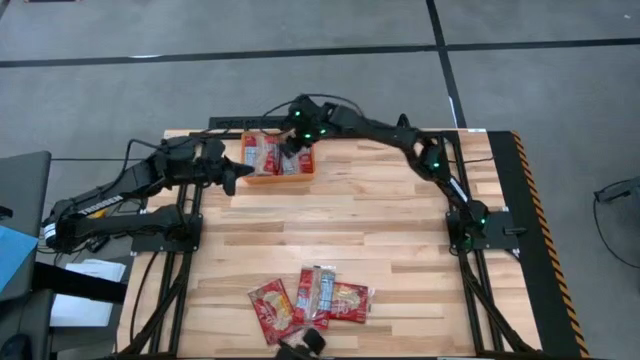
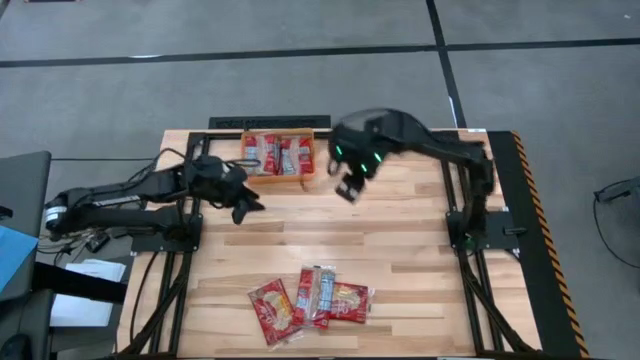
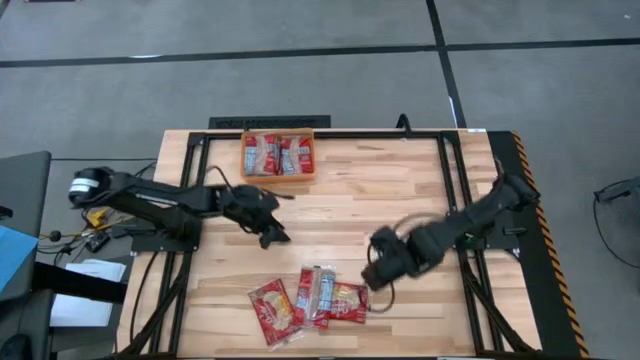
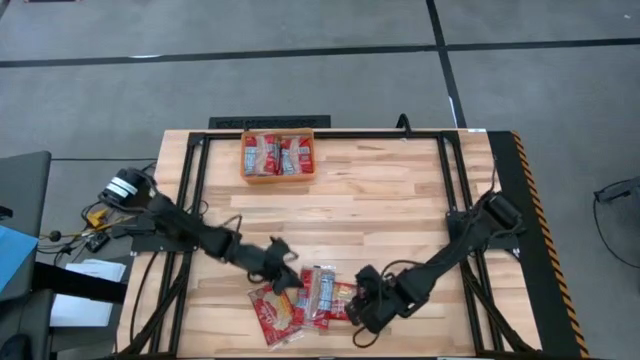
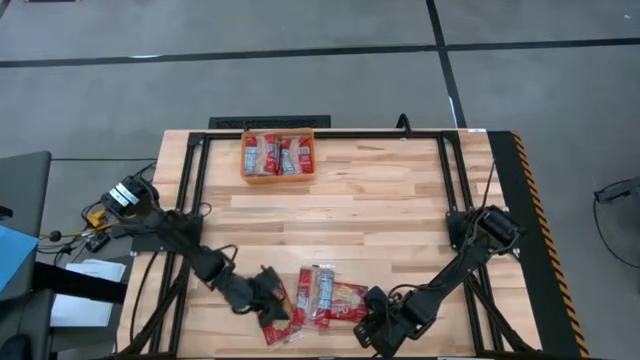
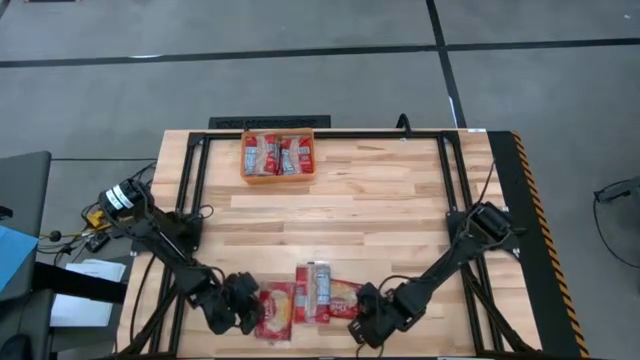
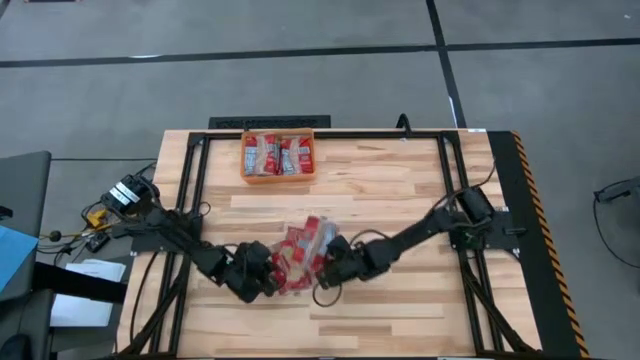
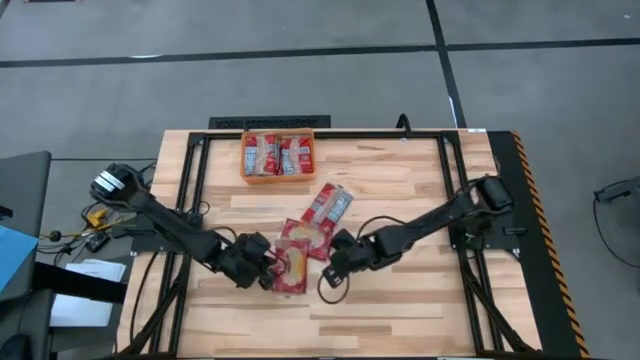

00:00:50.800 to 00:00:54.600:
Task: Sort popcorn bags into baskets
Adjust the popcorn bags

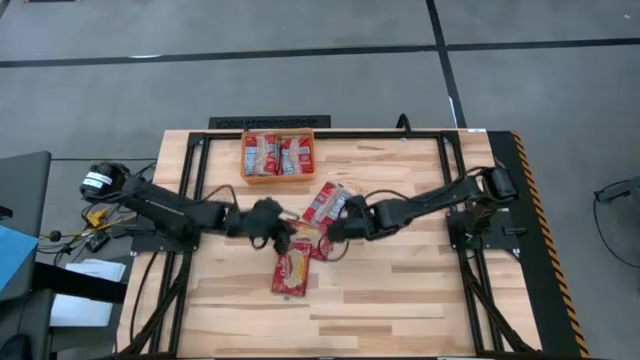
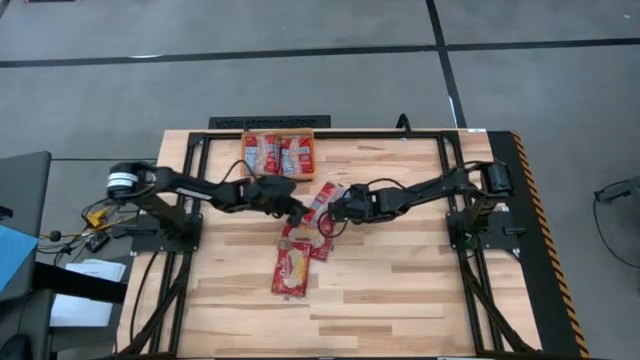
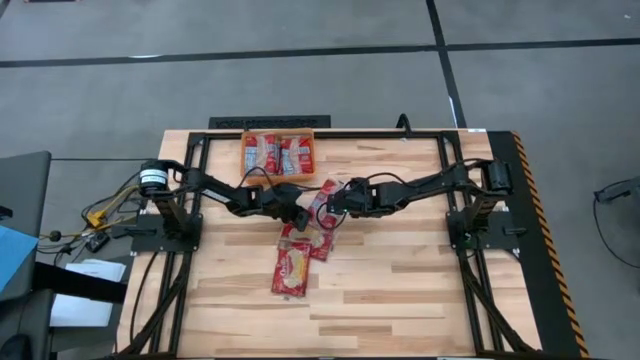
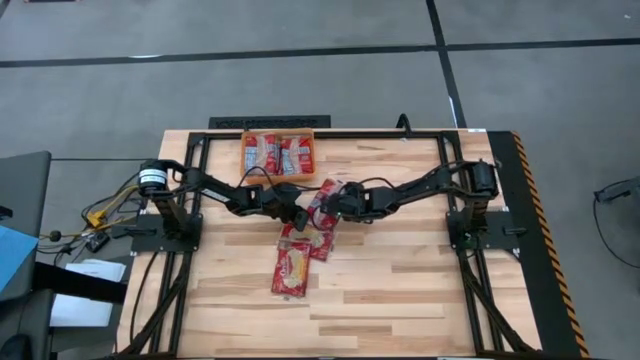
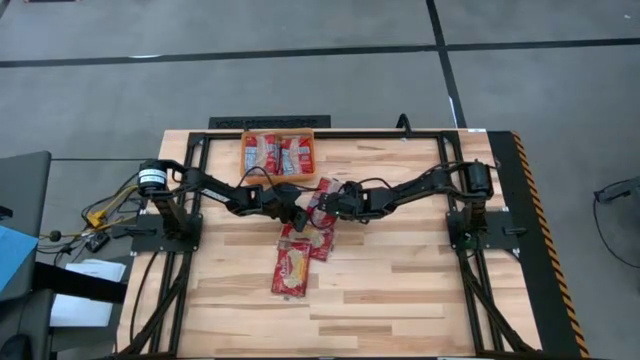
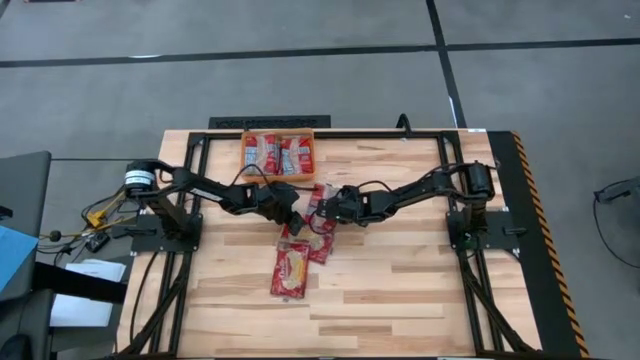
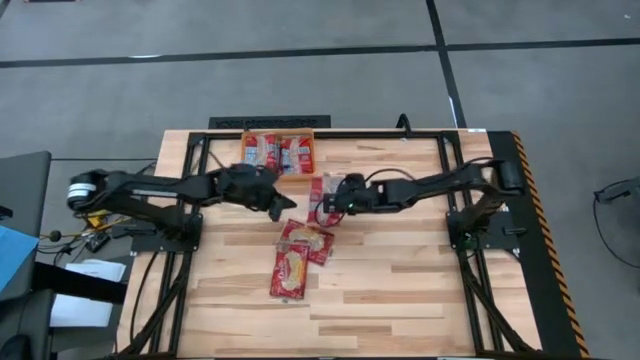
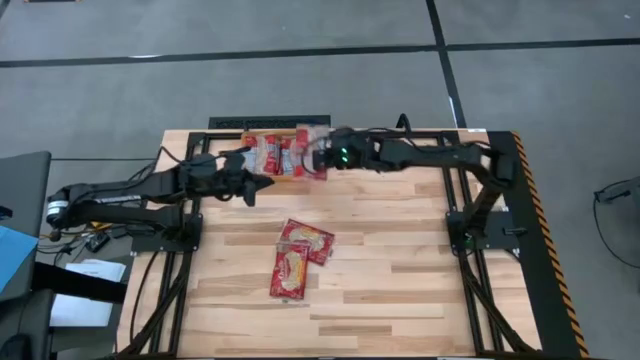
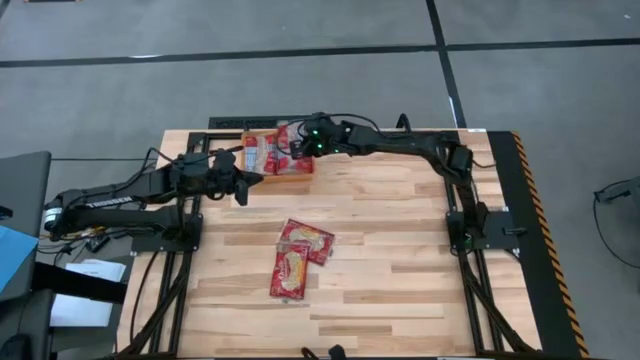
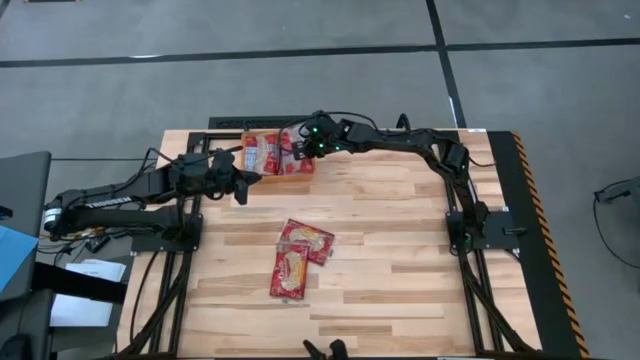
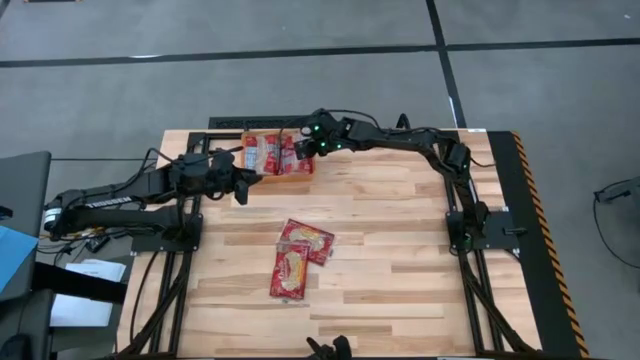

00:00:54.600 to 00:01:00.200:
Put the popcorn bag into the orange bin

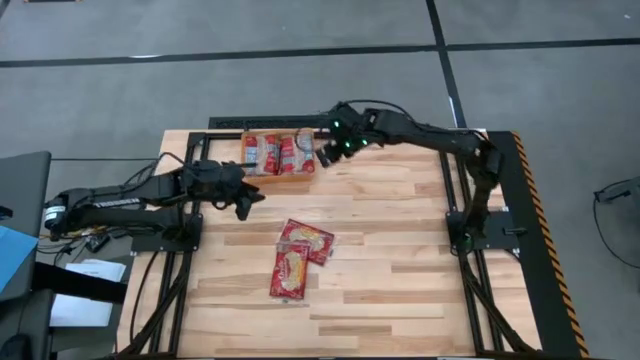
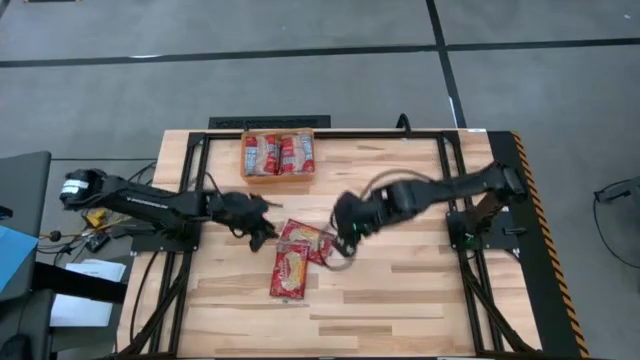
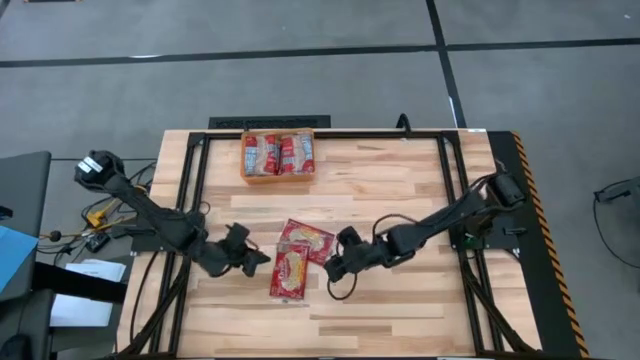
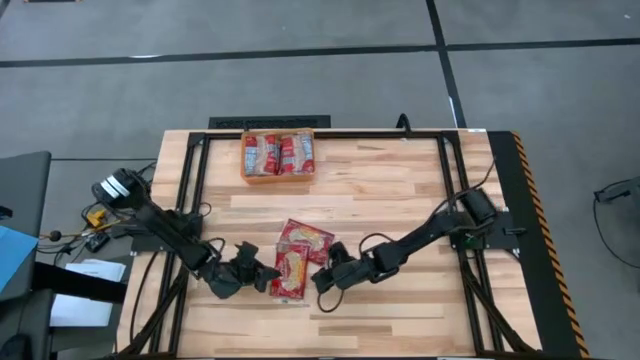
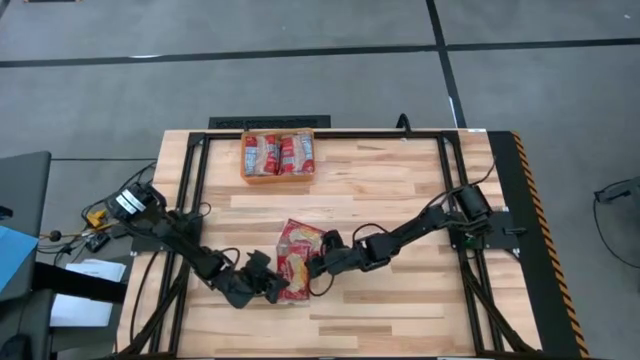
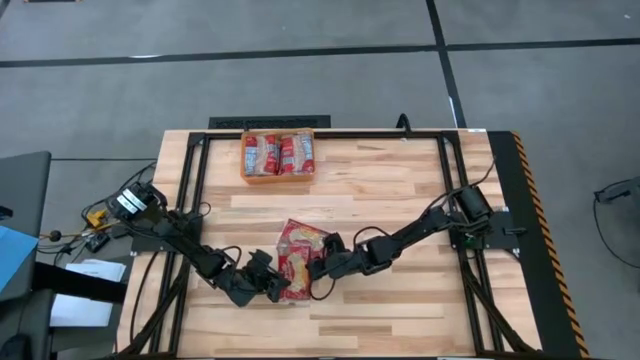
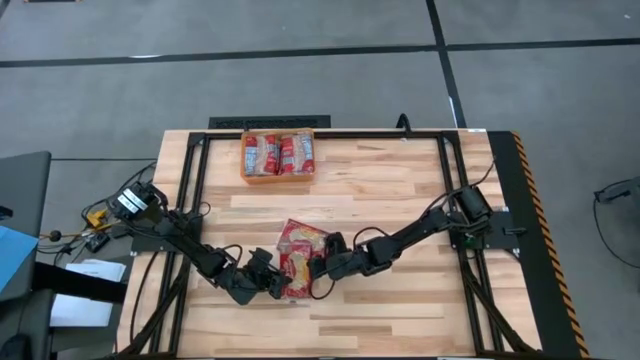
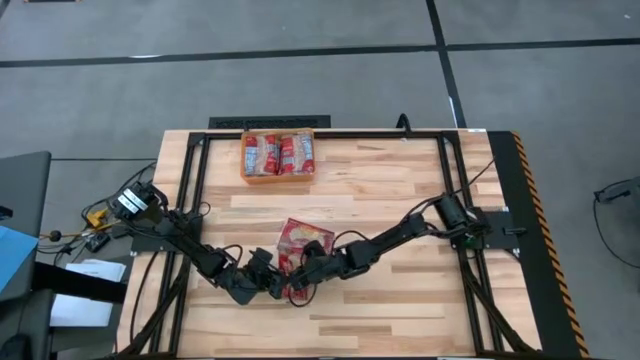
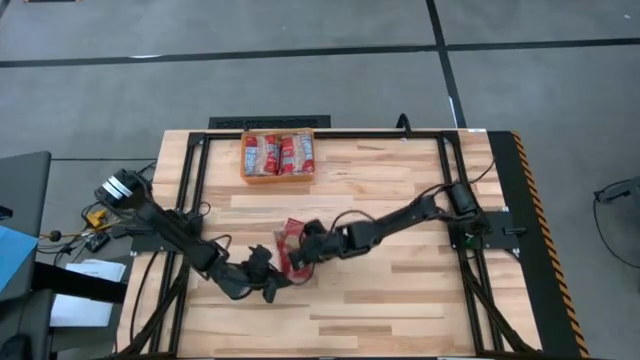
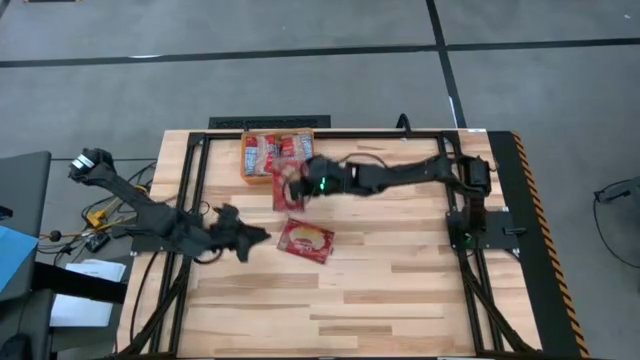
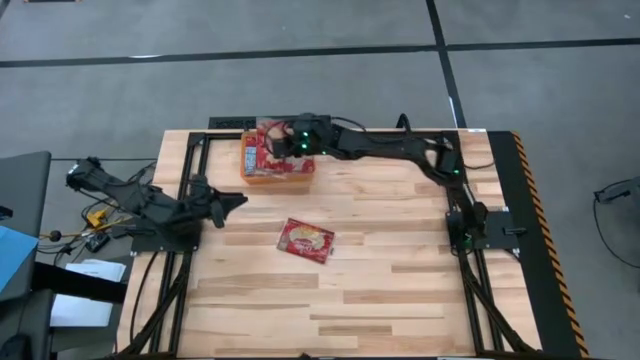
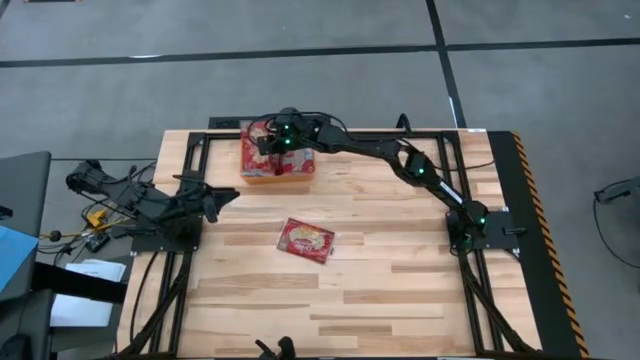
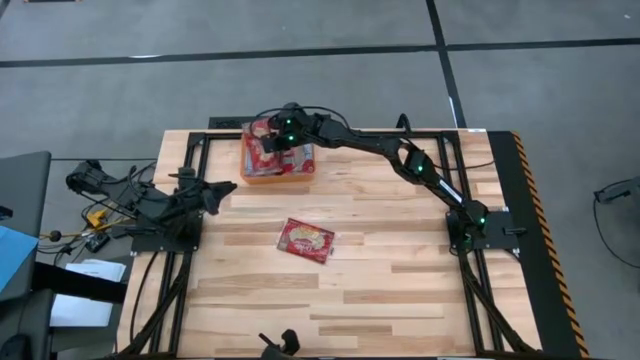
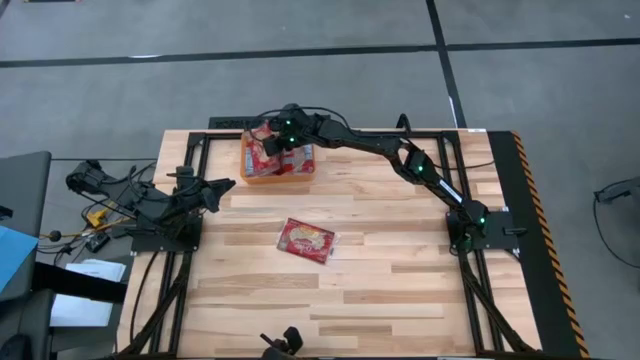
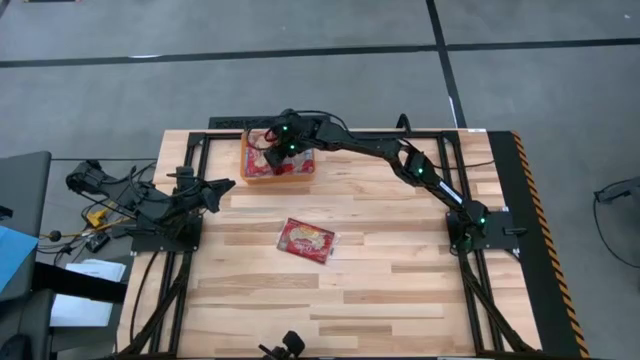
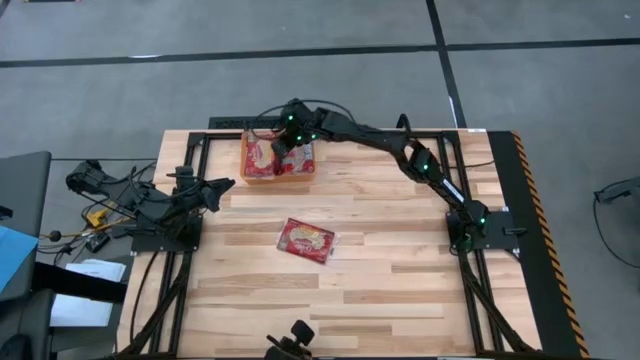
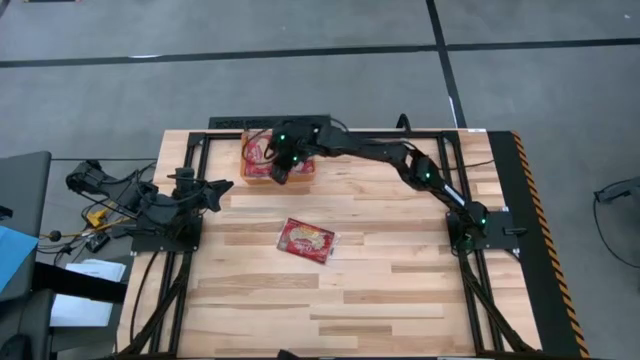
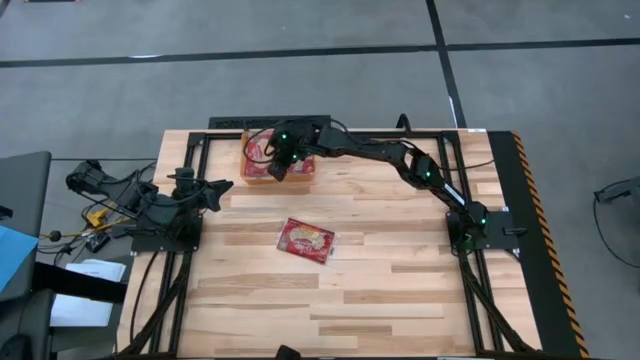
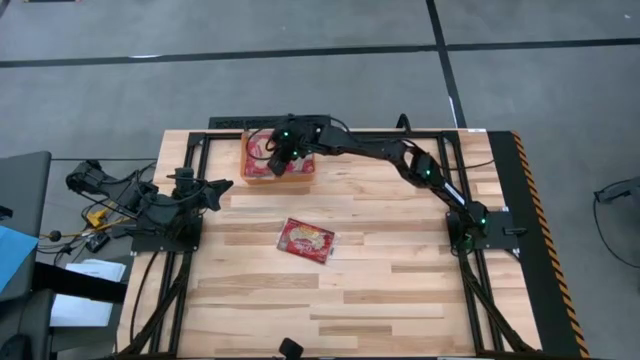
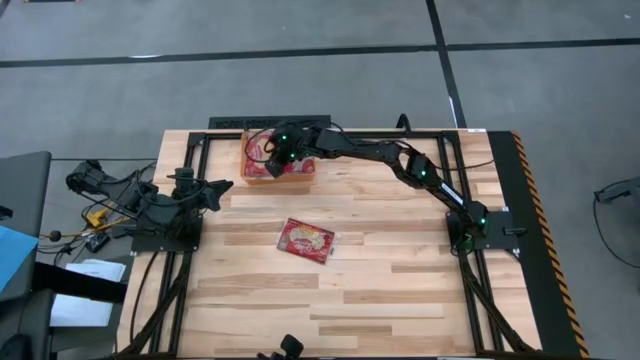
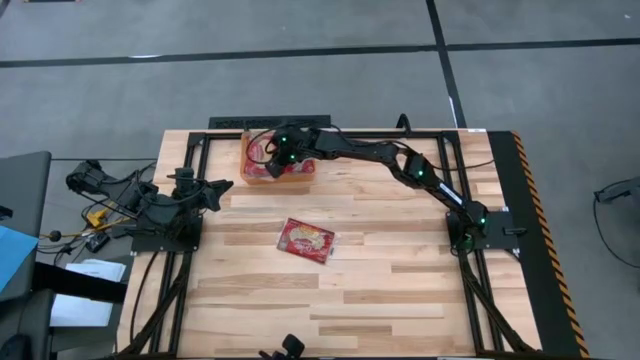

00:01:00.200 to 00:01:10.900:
Put the popcorn bag into the orange bin

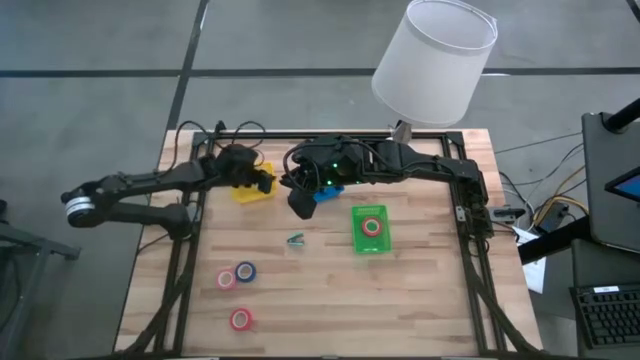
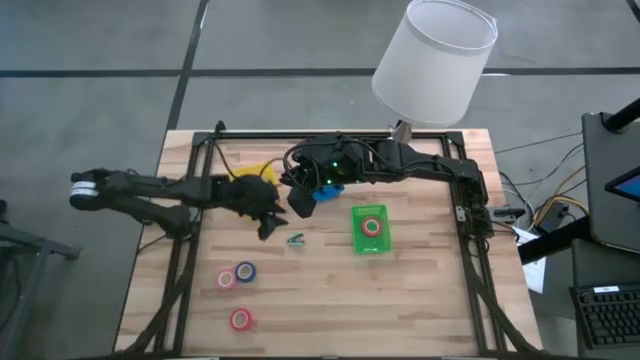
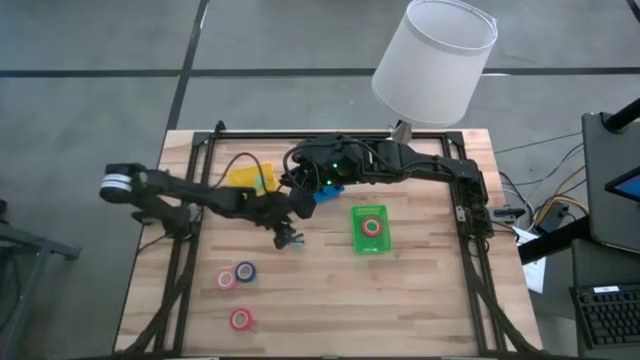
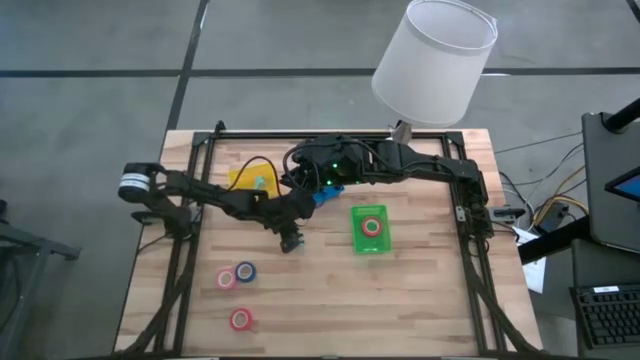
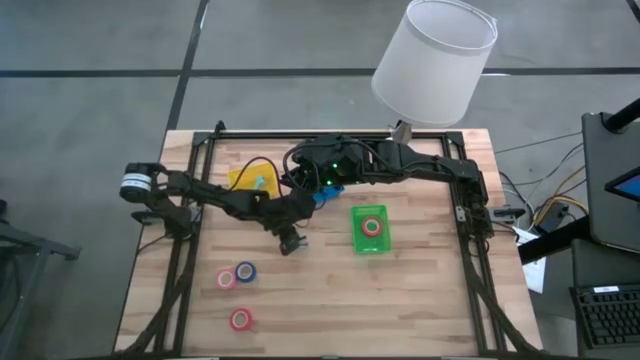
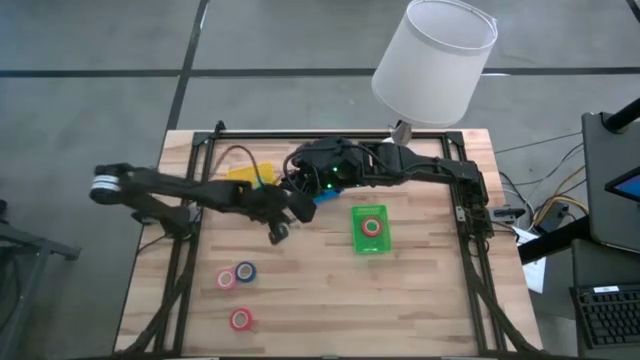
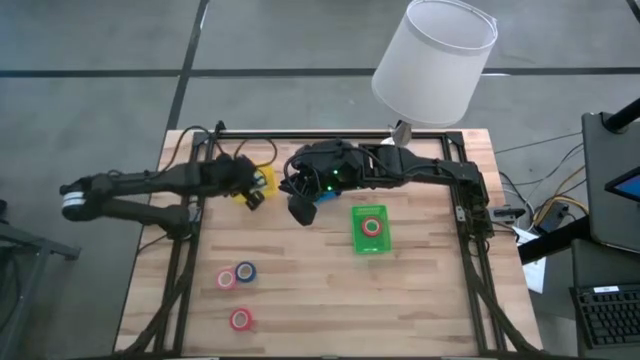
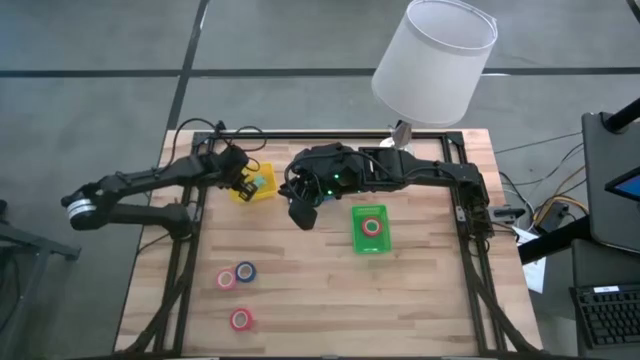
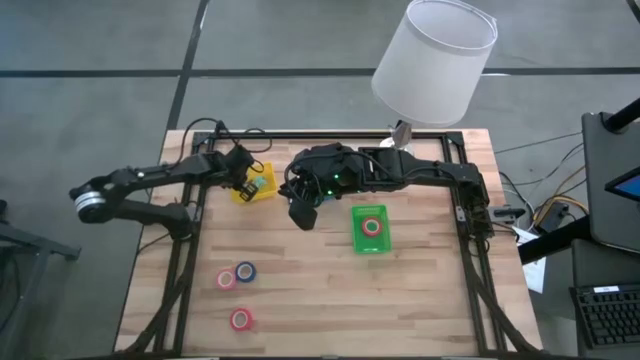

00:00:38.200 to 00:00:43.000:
Task: Pick and place Stapler, Stapler remover, tape
Put the blue staple remover into the yellow bin
